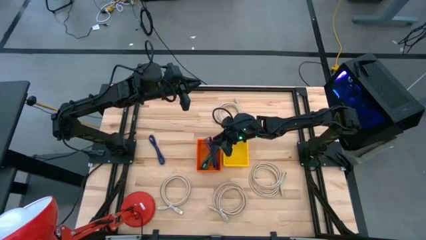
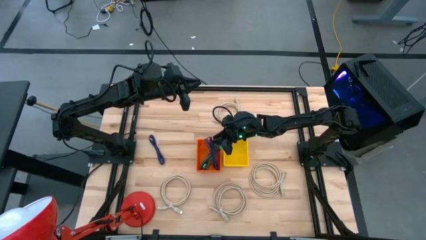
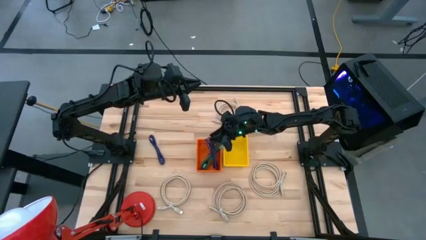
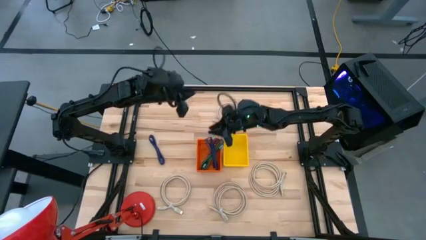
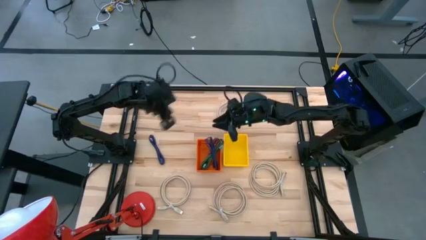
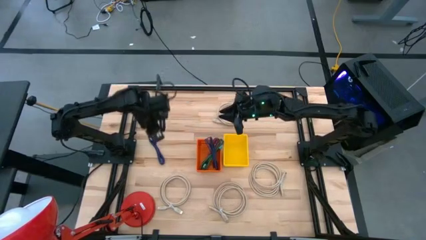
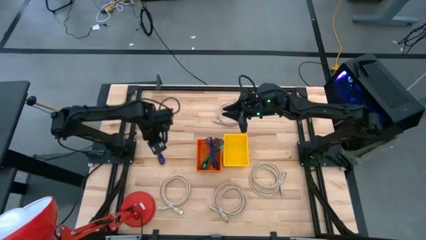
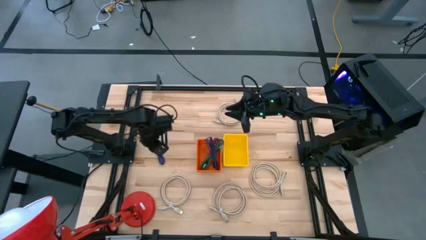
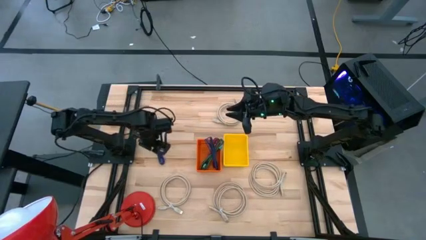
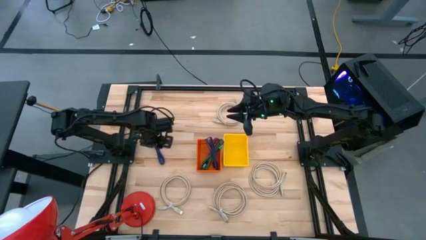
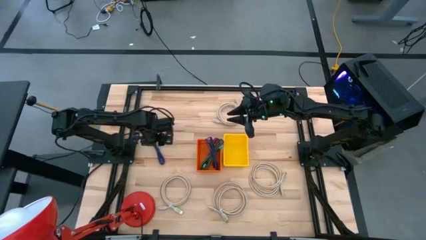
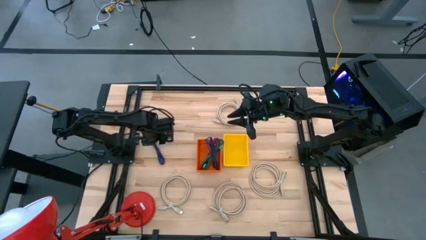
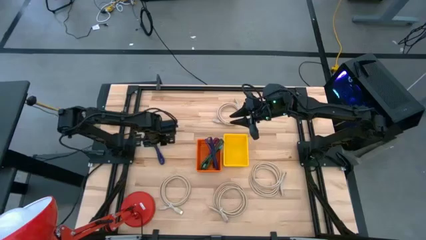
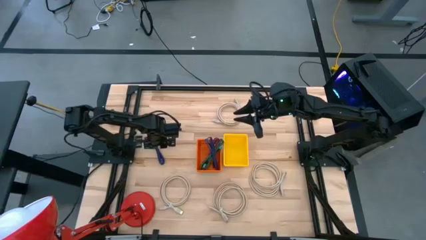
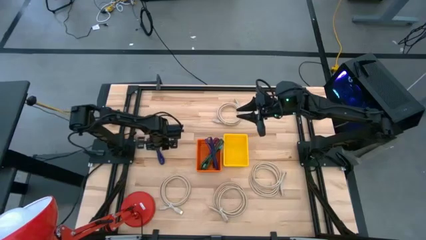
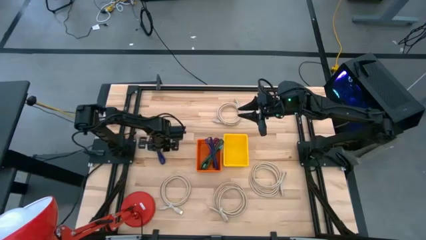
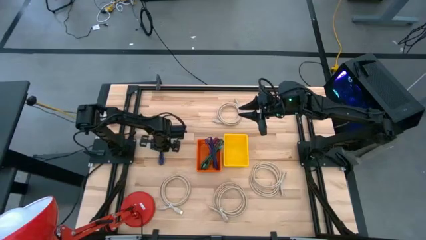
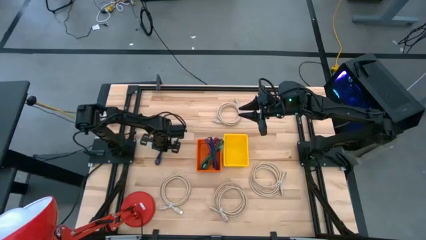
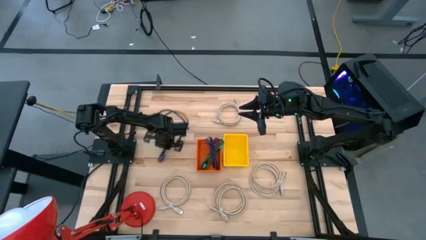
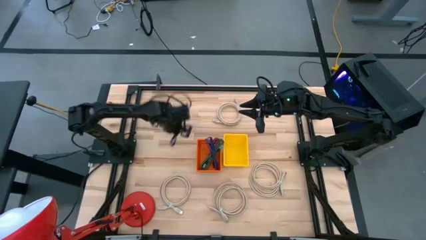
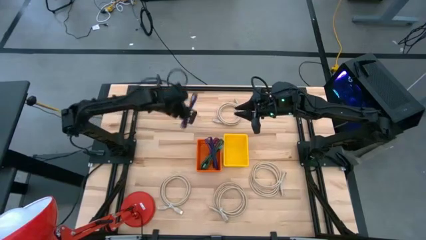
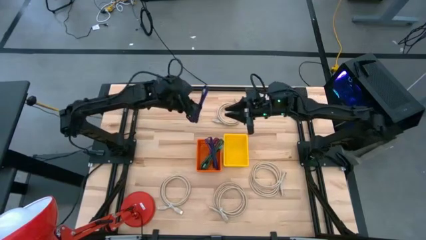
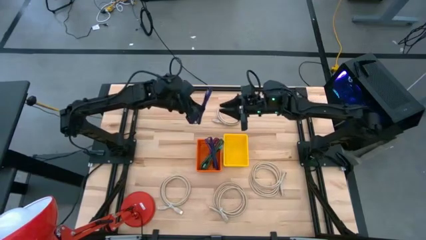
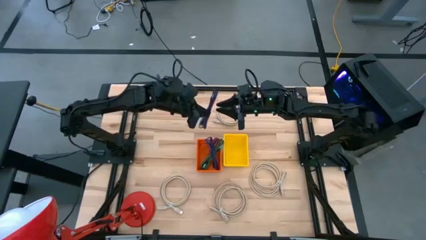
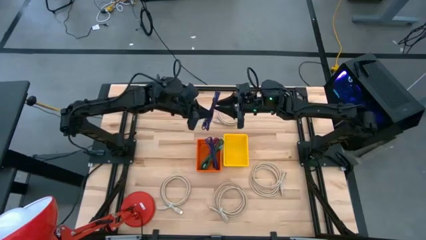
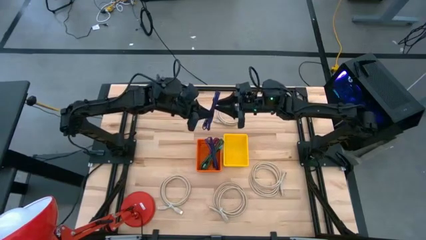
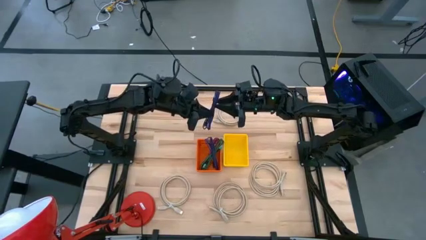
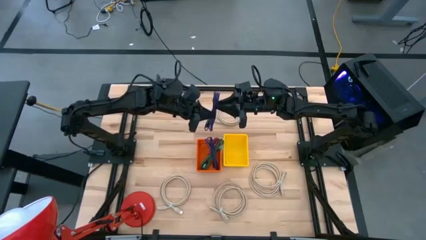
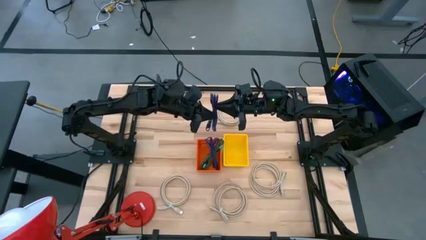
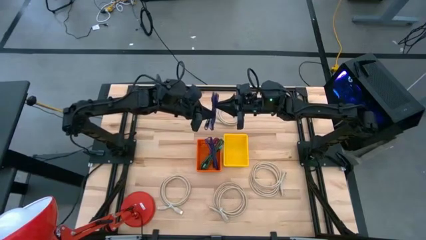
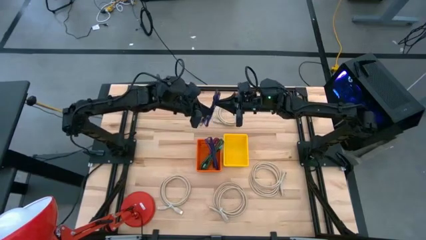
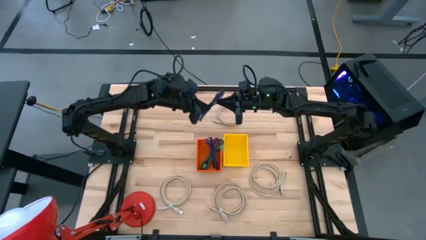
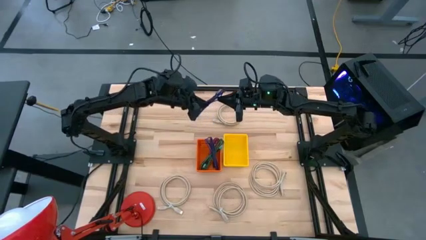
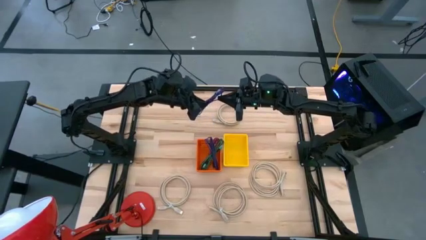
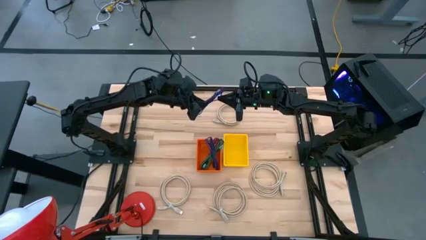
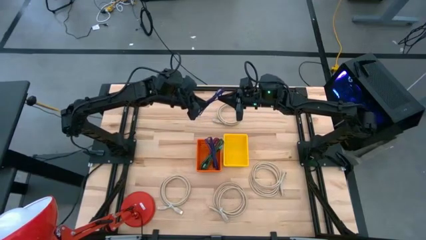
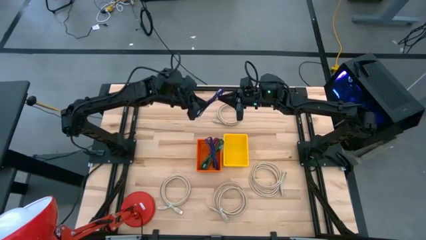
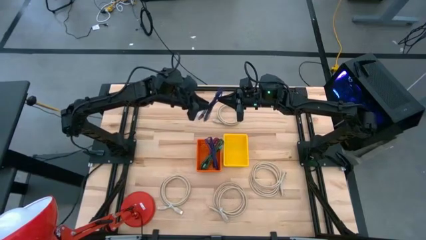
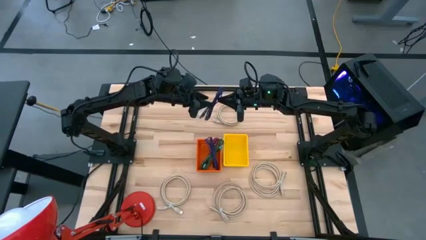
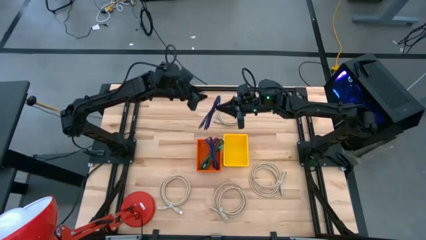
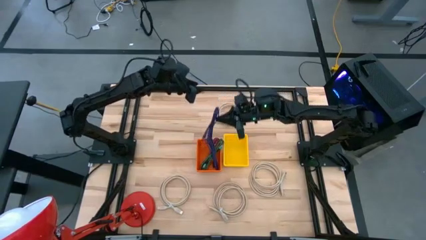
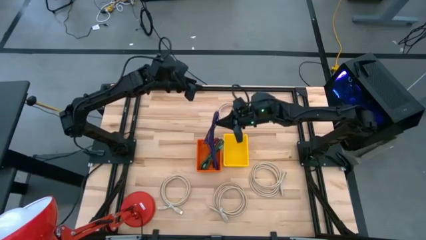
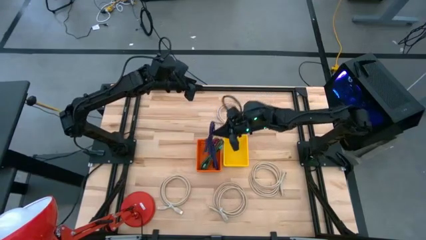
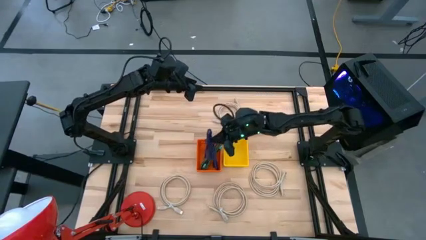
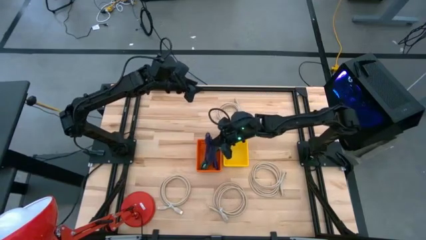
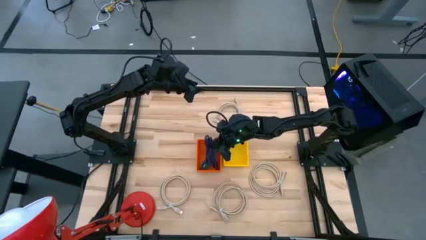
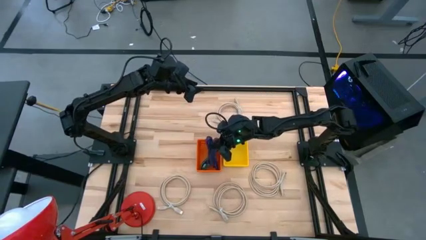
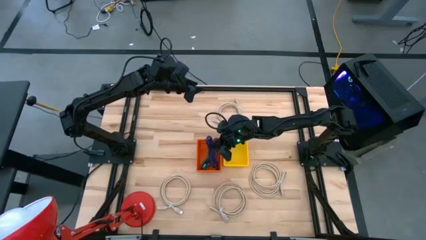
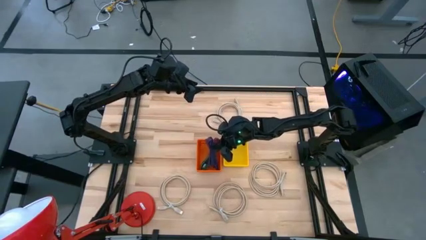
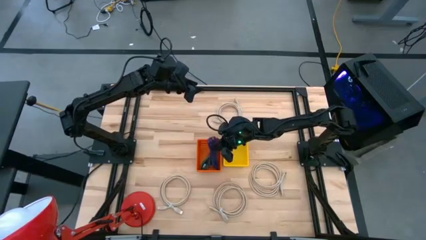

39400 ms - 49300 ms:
Task: Pick & Place USB Port
Put the purple charger cable into the orange basket

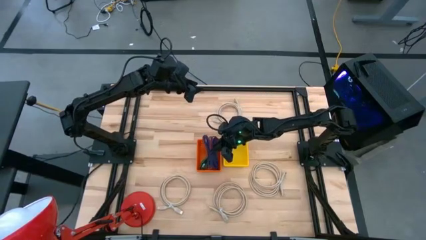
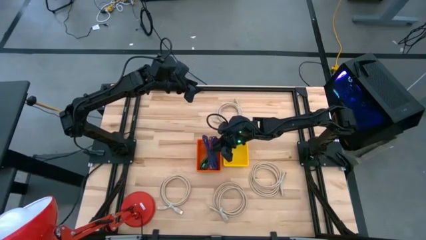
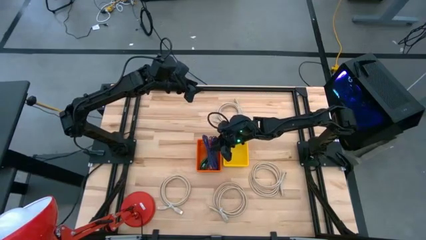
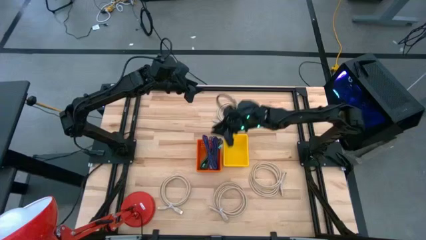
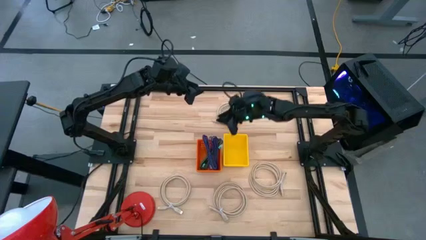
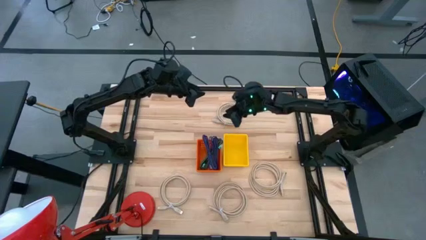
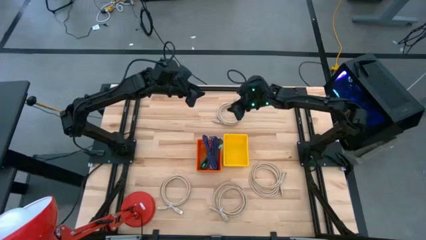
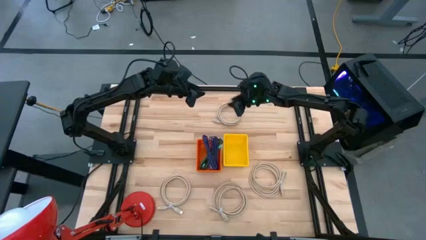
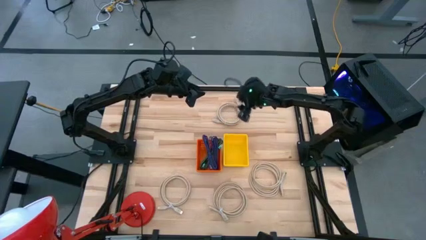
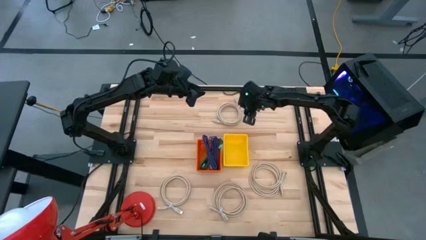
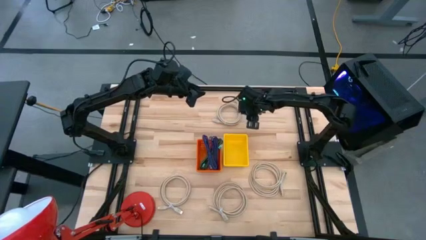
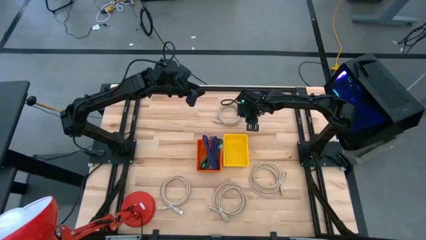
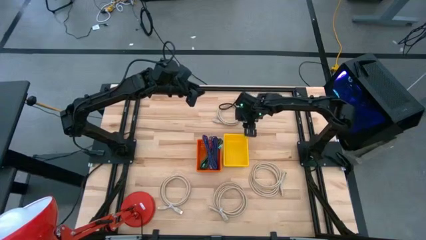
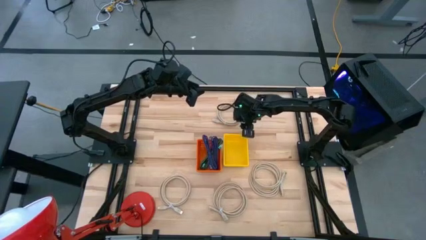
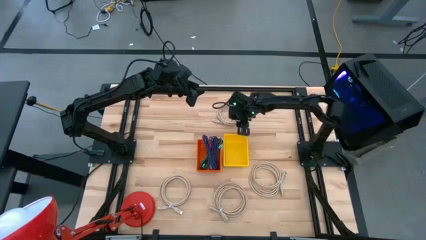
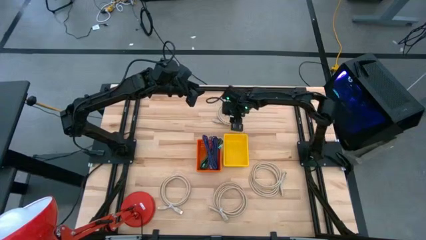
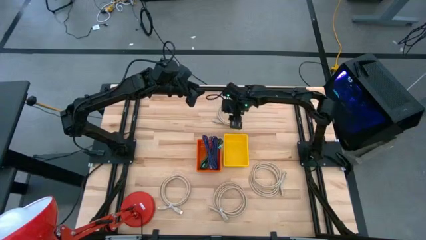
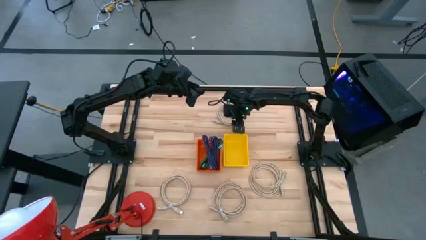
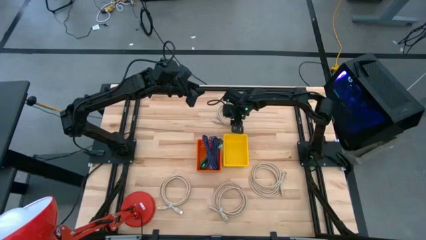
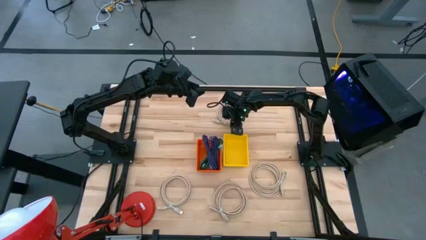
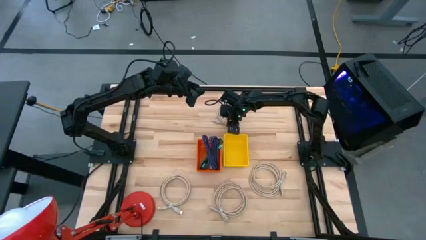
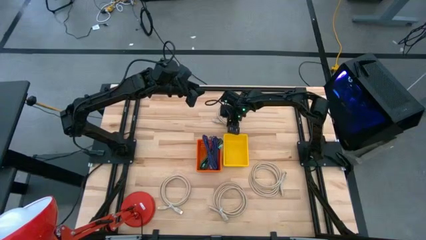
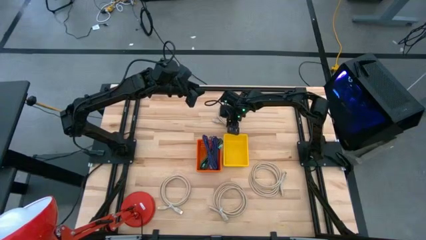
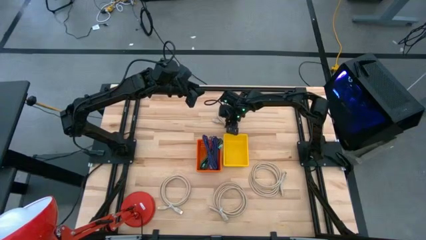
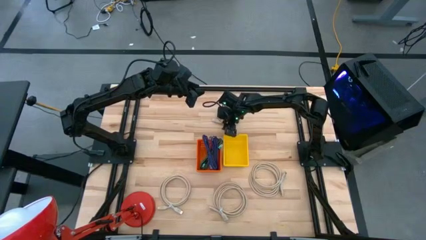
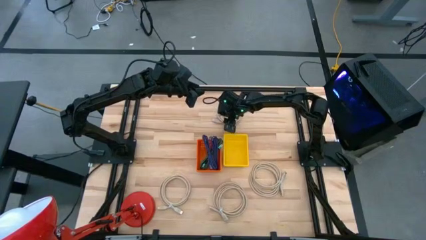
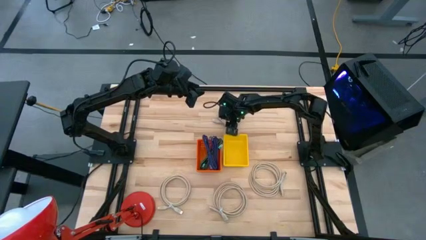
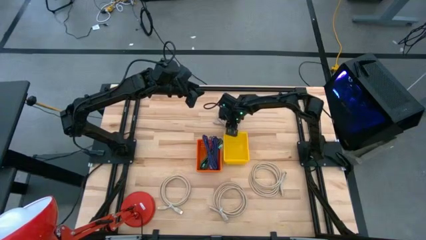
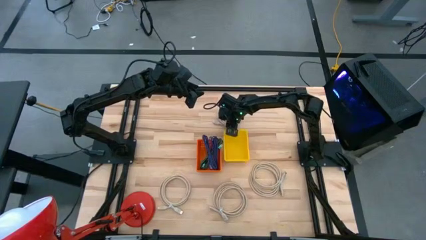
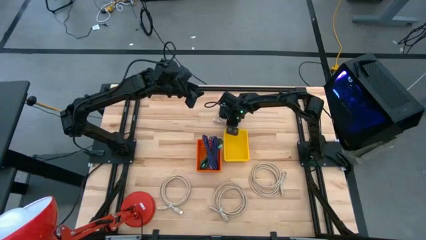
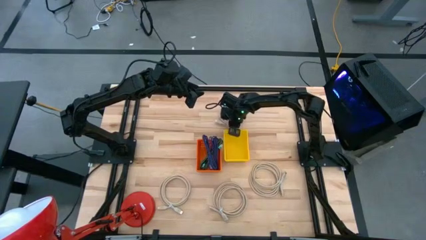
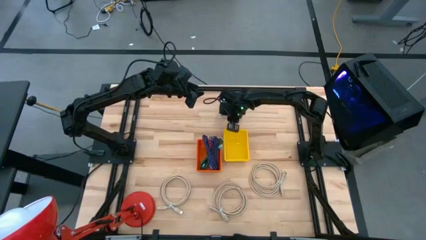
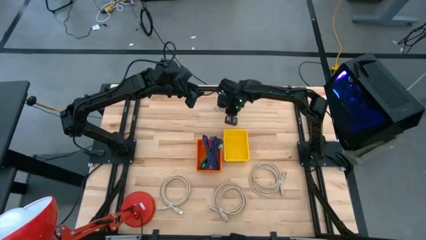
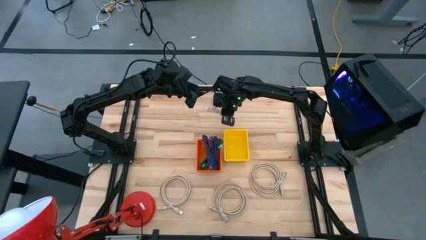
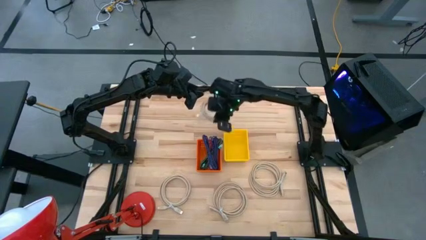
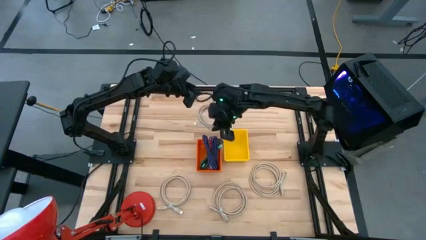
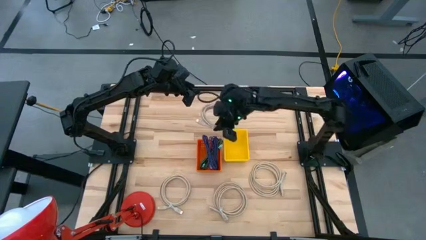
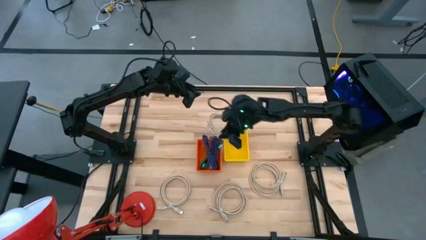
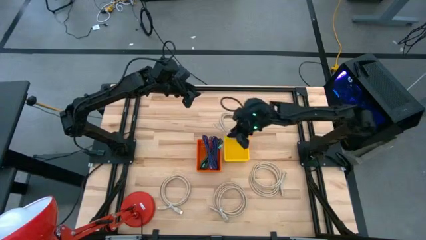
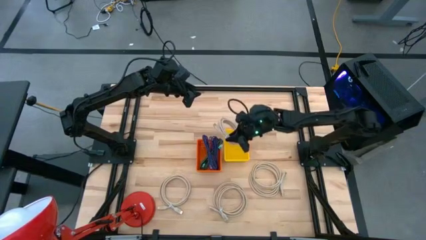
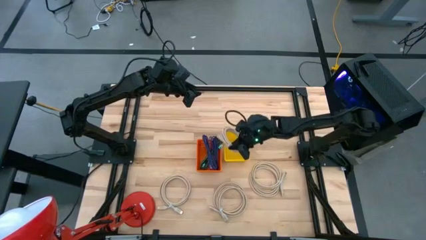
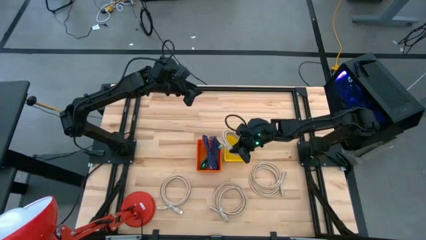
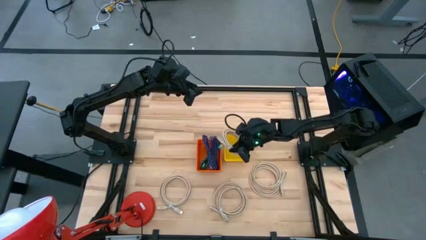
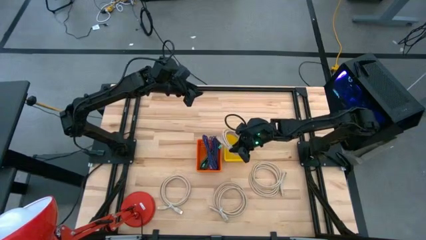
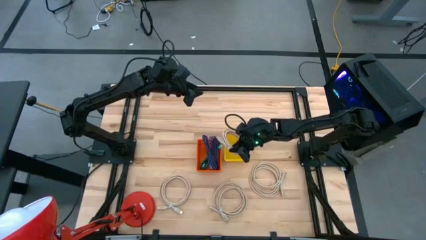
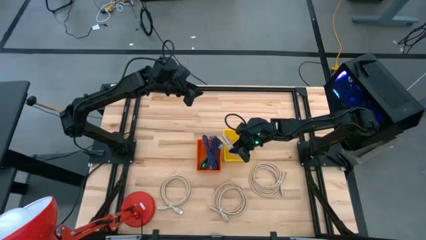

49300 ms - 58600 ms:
Put the brown HDMI cable into the yellow basket
